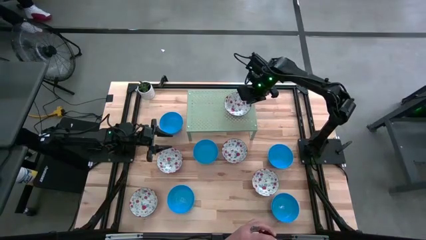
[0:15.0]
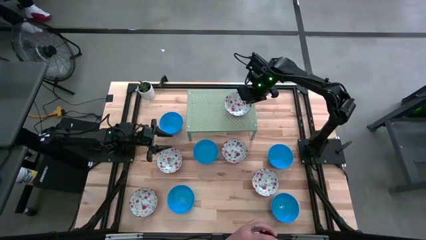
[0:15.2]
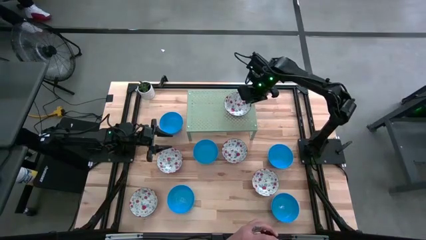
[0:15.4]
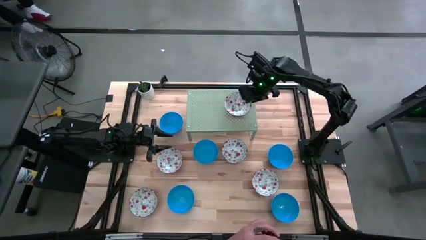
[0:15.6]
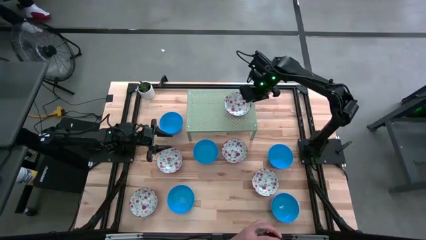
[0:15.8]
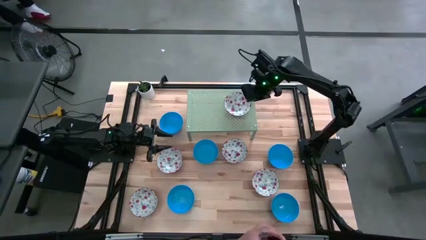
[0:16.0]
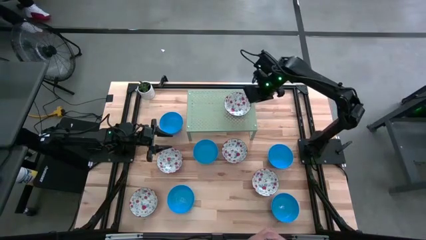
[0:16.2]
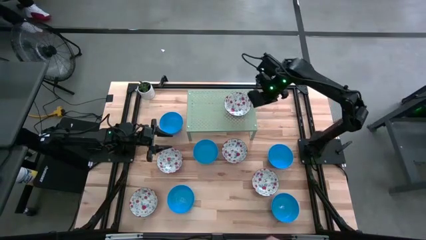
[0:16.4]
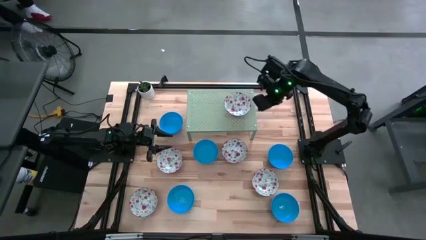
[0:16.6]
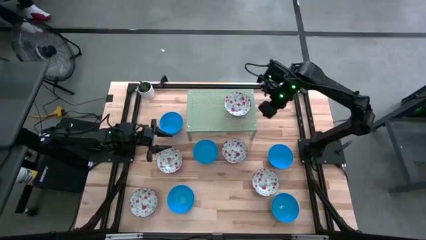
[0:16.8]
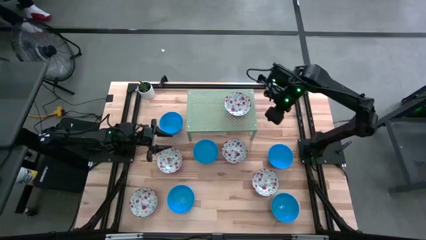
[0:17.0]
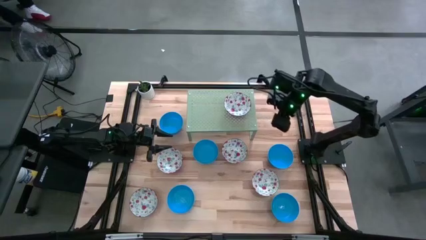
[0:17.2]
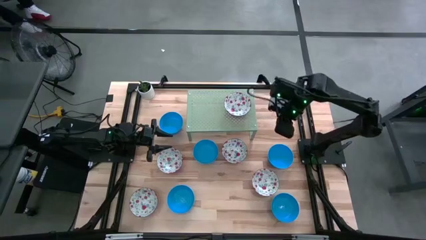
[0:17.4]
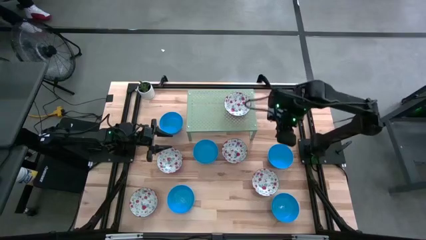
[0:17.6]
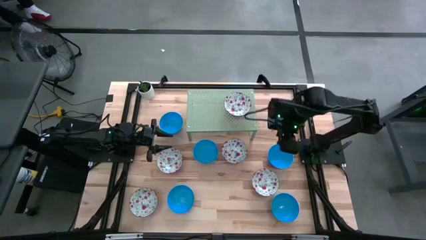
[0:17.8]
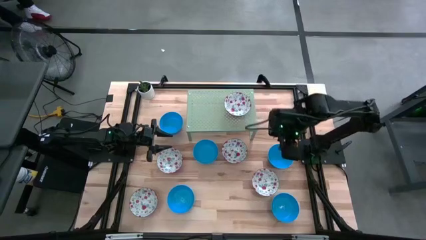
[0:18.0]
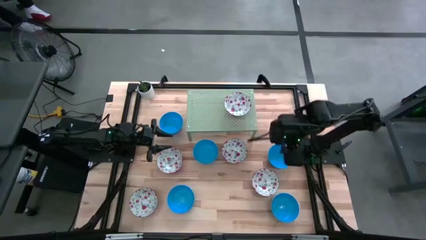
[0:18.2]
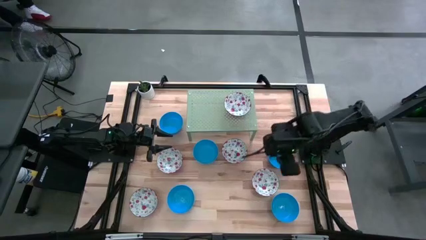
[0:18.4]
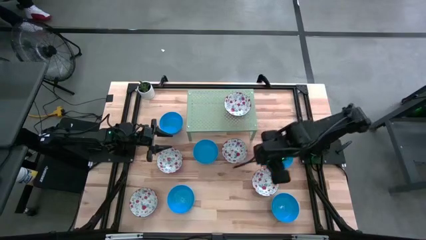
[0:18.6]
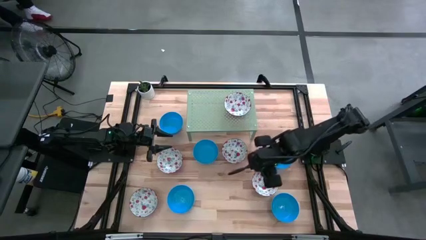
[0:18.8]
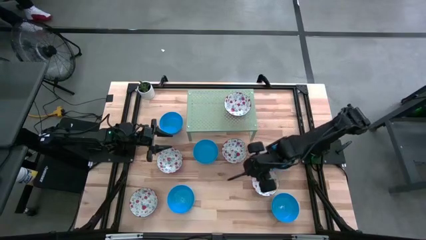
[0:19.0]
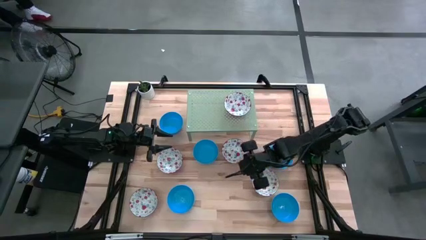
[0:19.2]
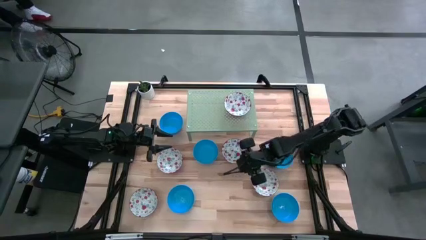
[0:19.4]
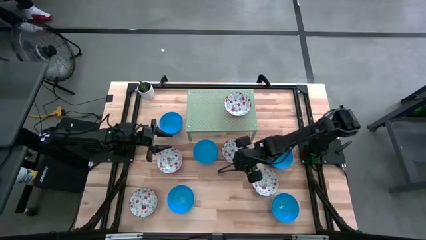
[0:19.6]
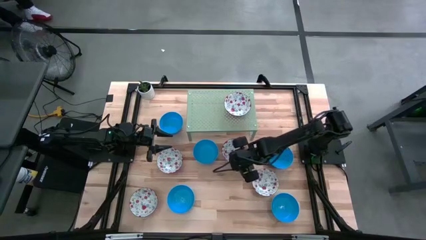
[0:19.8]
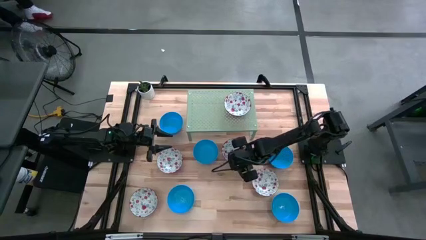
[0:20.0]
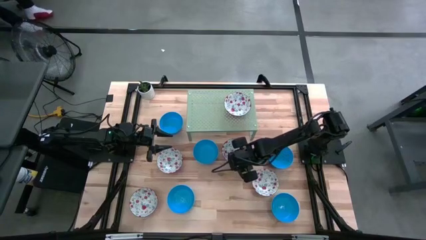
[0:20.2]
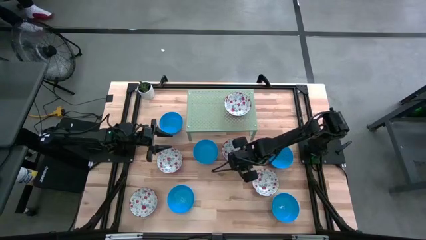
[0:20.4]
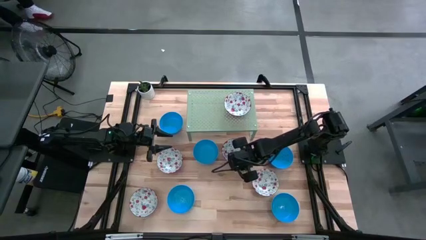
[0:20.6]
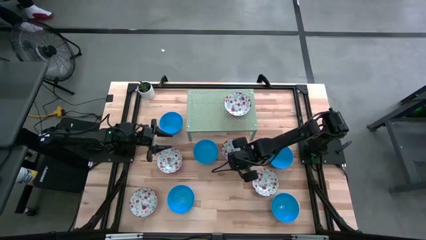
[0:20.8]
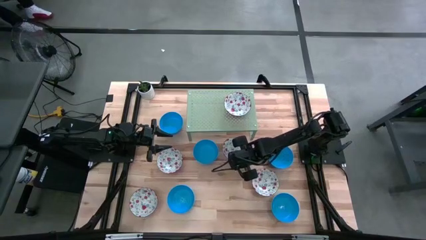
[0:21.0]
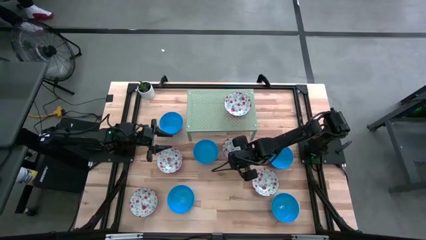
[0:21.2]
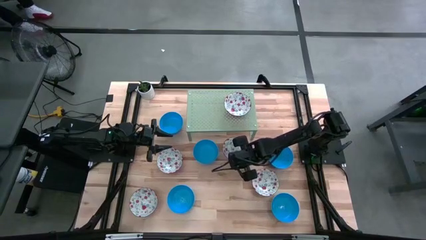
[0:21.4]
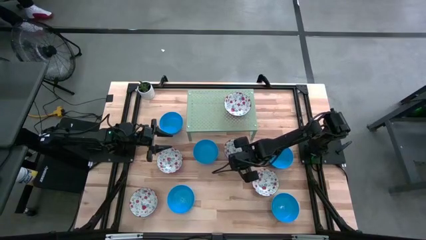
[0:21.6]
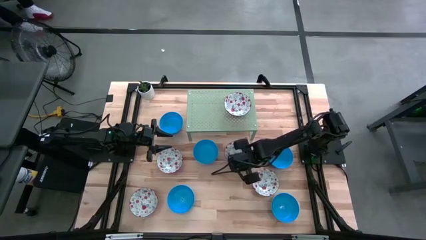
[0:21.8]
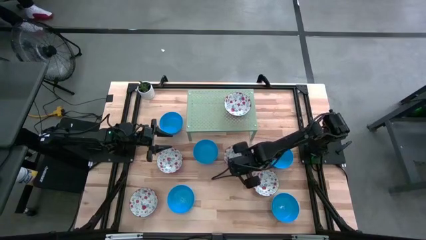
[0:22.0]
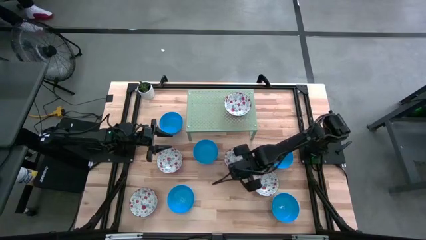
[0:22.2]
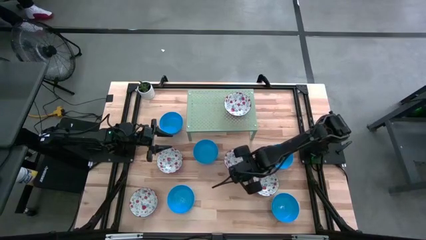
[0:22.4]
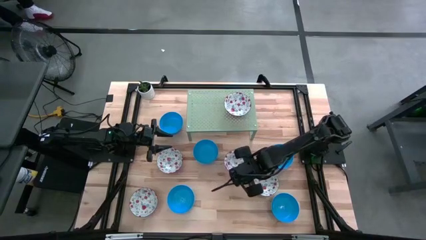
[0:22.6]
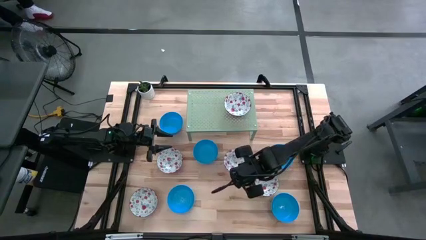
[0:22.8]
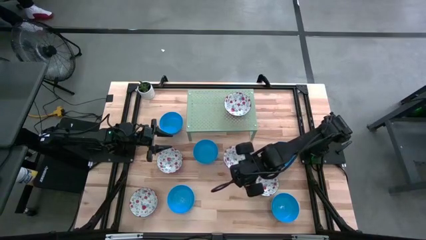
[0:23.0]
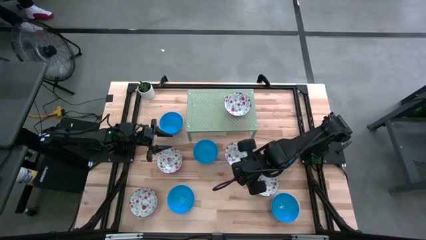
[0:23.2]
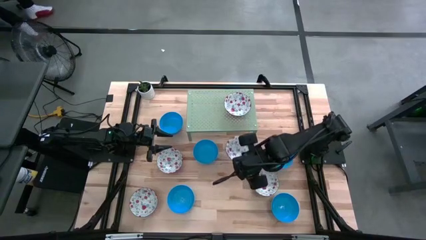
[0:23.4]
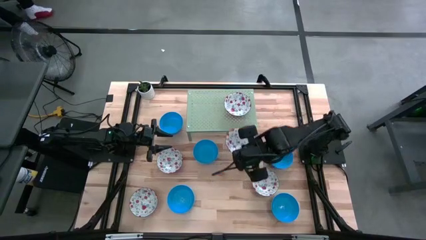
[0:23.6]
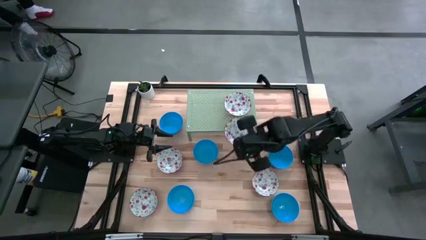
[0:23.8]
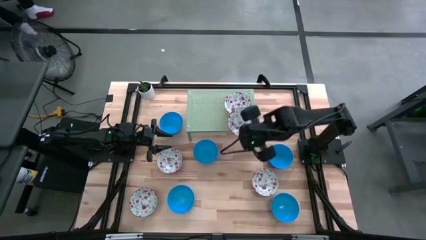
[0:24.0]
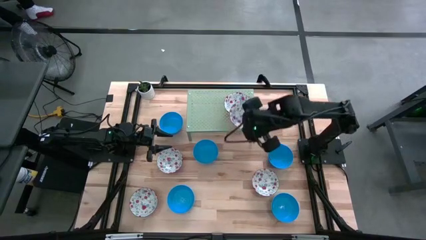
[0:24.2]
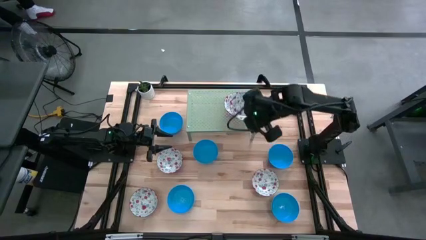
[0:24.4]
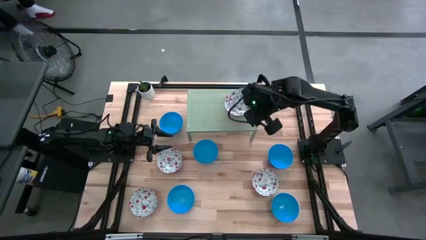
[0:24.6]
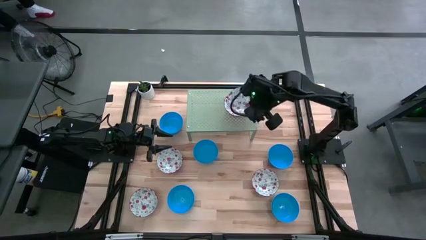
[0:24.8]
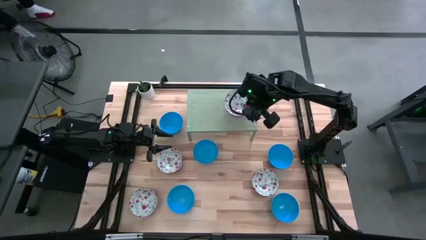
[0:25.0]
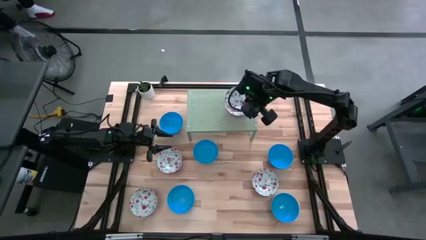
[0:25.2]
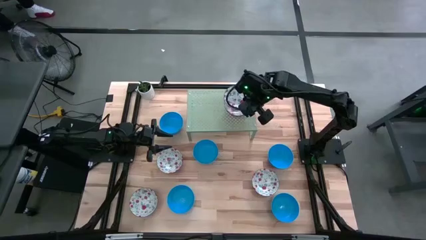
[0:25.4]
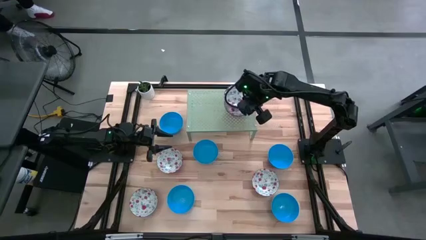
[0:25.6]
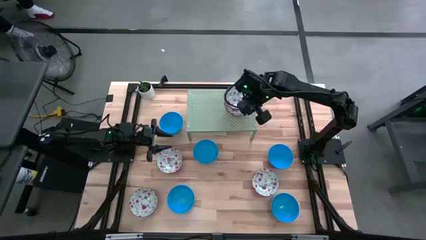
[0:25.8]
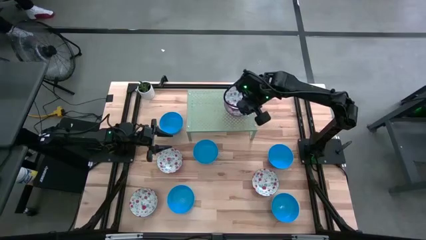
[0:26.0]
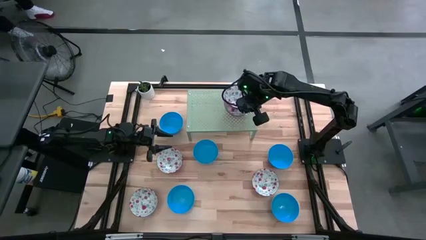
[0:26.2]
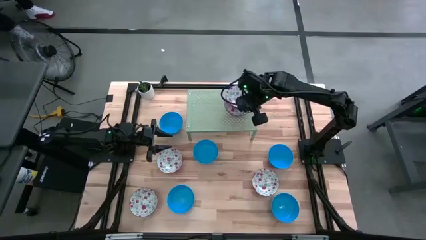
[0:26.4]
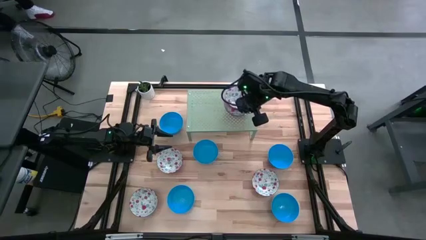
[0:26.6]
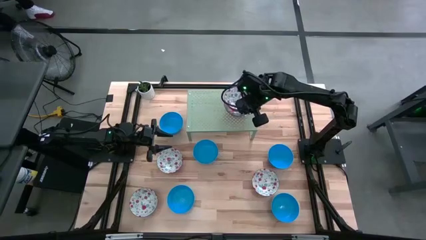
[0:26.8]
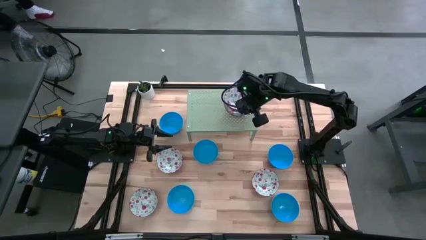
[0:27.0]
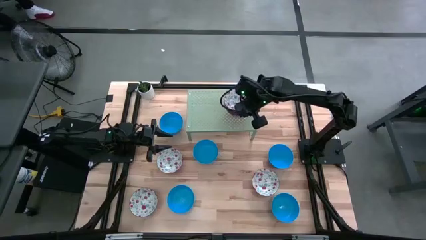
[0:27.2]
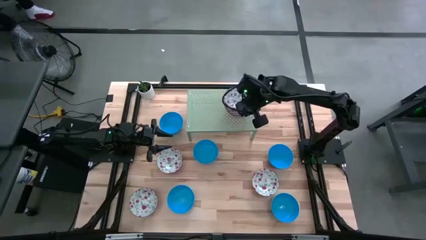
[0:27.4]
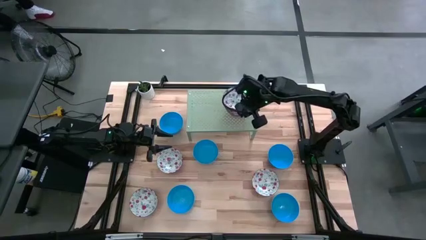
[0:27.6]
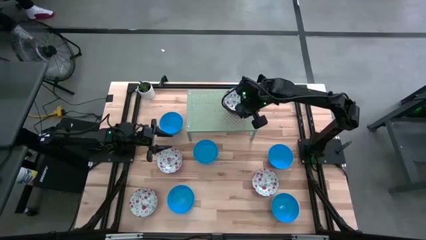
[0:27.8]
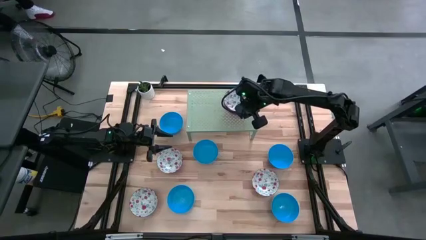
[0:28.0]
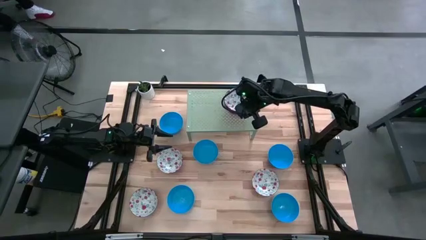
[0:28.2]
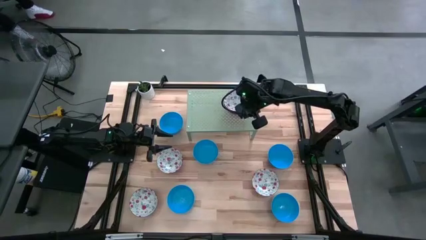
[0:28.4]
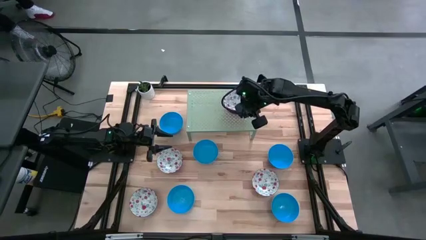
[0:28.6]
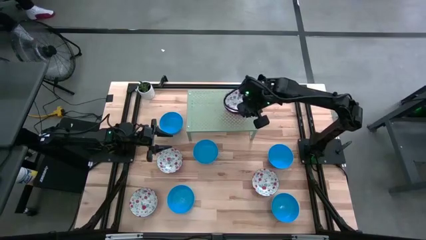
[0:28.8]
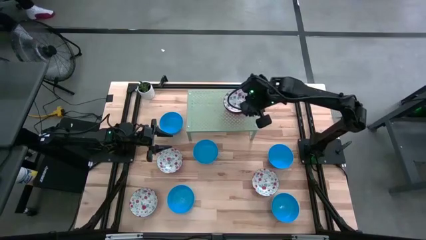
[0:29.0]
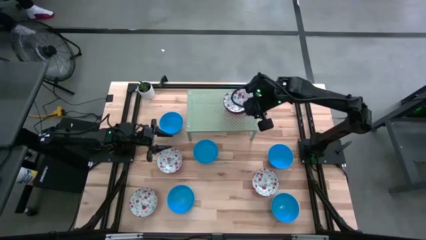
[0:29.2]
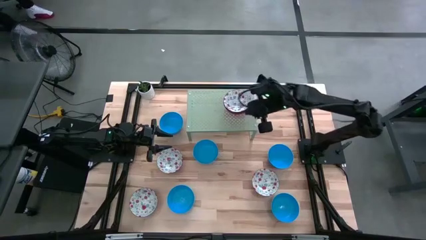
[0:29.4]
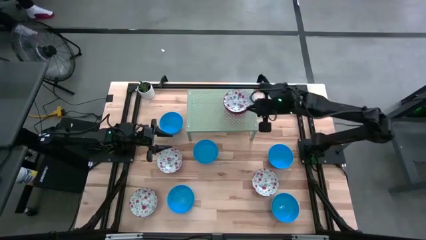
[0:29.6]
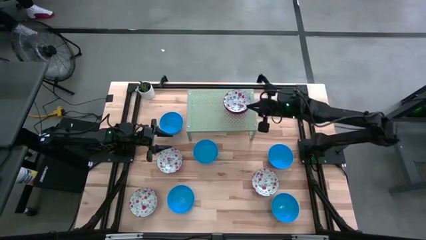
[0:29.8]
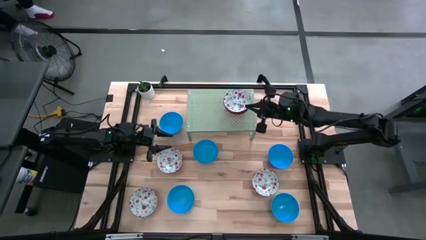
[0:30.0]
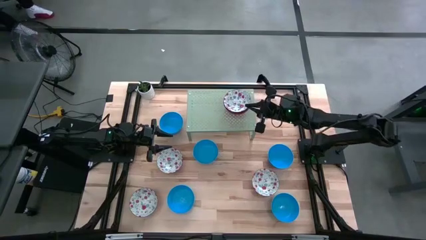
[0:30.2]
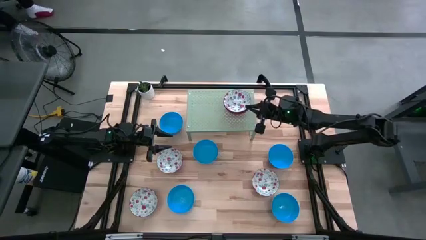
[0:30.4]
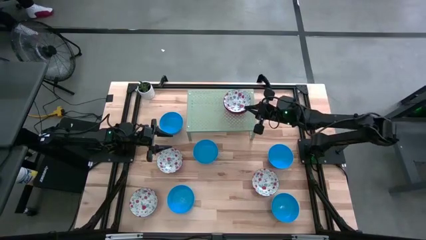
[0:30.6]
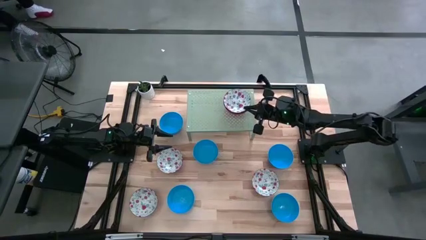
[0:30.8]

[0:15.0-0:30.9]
Task: Pick & Place Mini bowls
Stack the red bowl on top of the red bowl on the shelf
